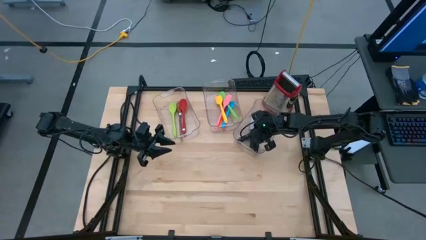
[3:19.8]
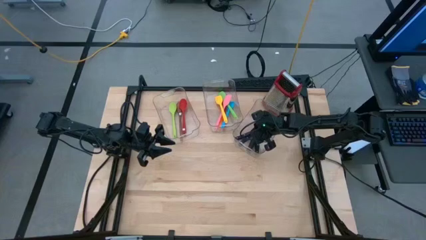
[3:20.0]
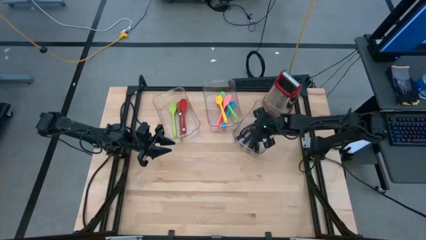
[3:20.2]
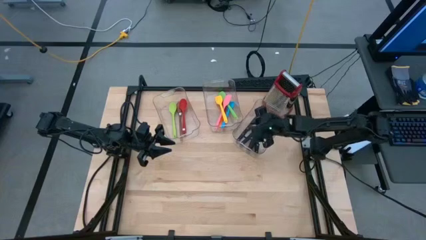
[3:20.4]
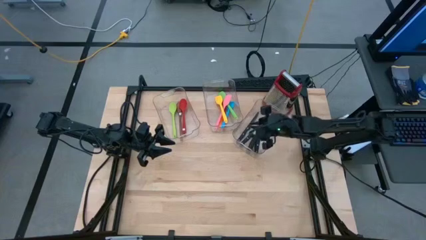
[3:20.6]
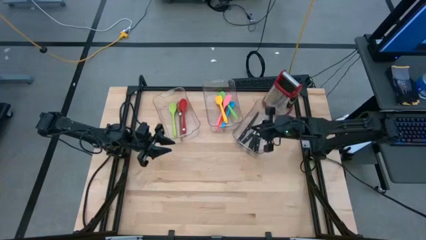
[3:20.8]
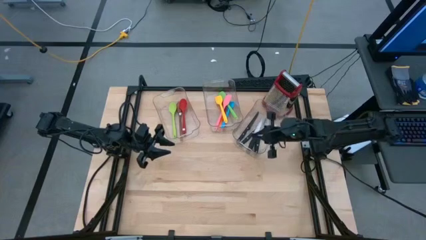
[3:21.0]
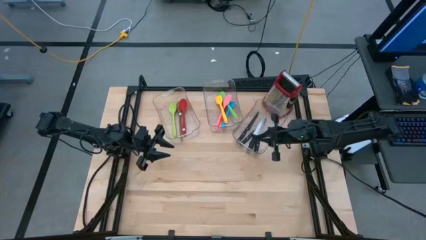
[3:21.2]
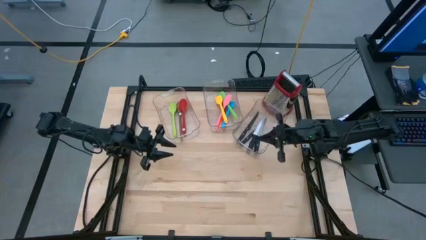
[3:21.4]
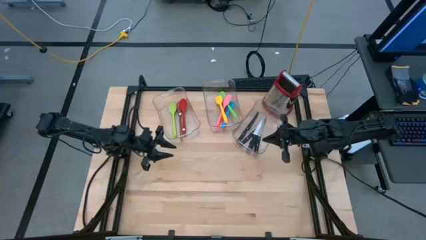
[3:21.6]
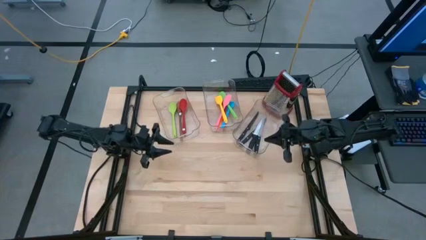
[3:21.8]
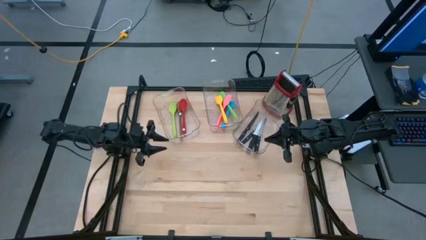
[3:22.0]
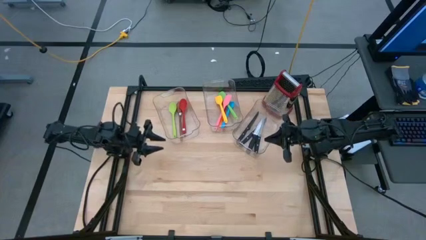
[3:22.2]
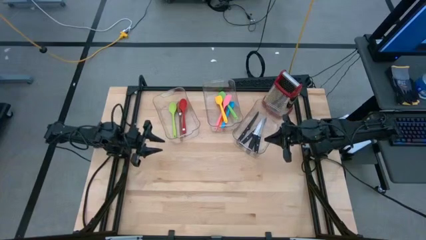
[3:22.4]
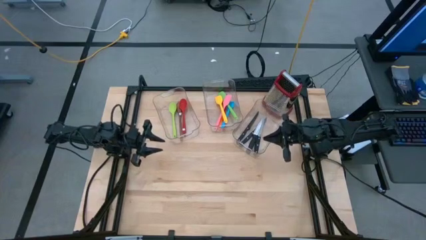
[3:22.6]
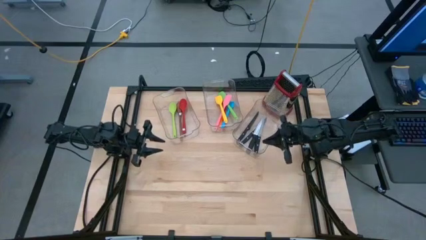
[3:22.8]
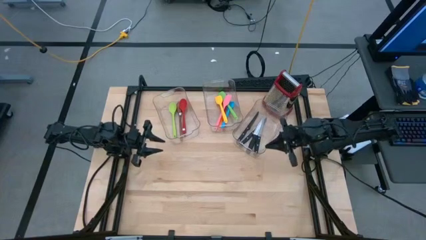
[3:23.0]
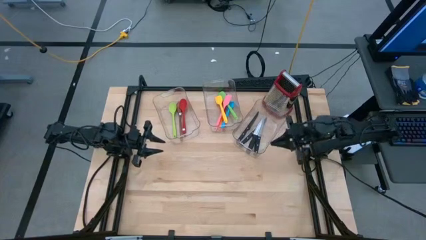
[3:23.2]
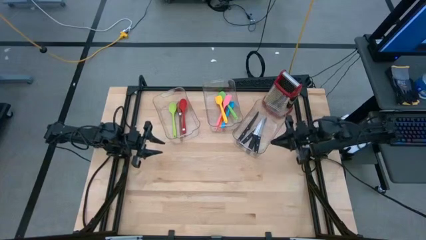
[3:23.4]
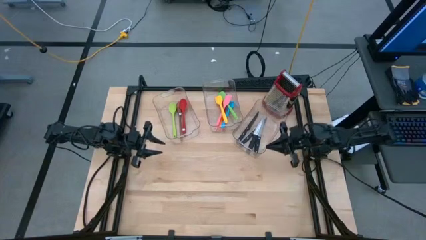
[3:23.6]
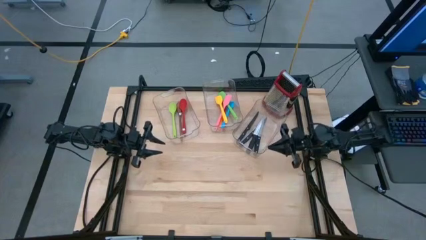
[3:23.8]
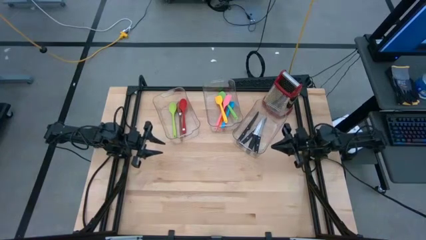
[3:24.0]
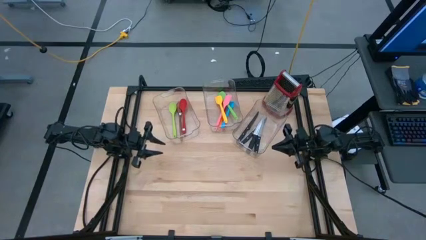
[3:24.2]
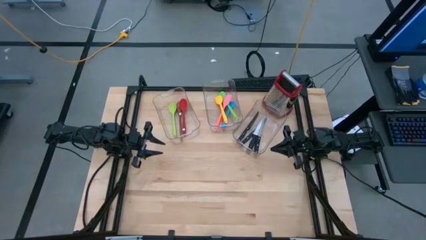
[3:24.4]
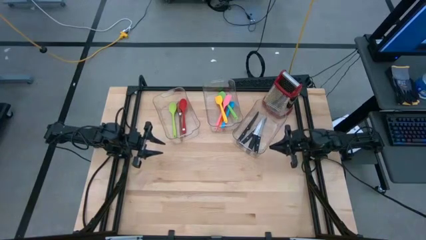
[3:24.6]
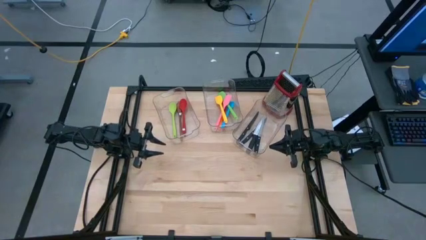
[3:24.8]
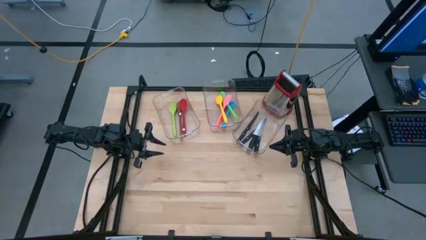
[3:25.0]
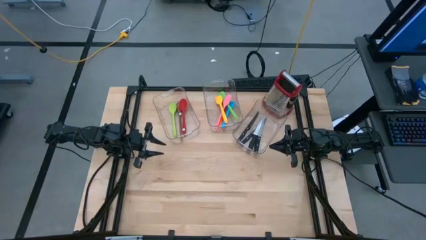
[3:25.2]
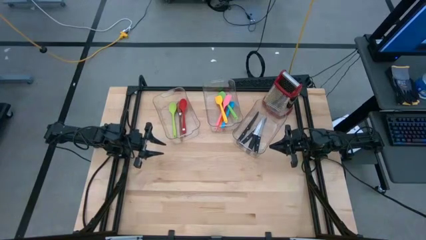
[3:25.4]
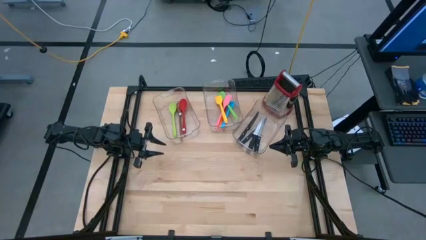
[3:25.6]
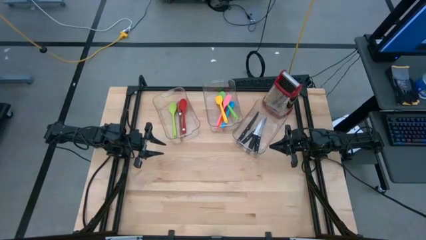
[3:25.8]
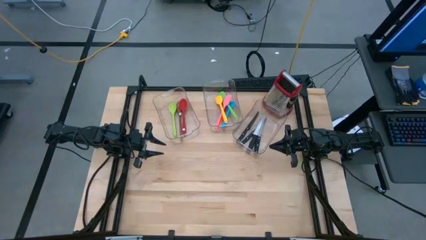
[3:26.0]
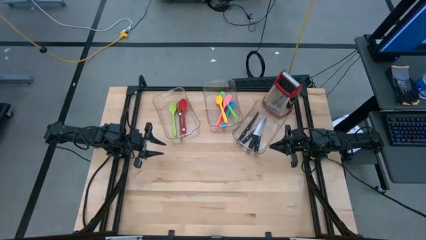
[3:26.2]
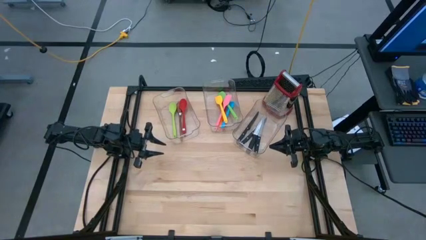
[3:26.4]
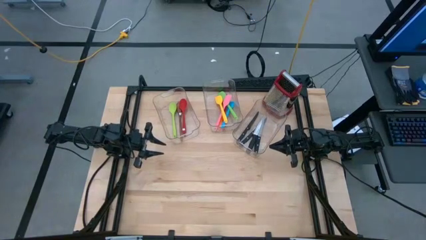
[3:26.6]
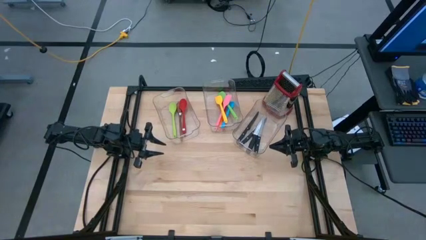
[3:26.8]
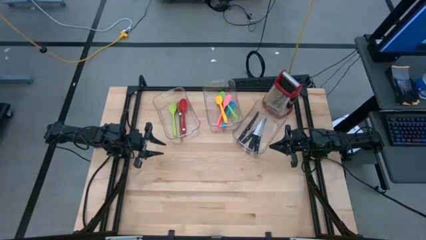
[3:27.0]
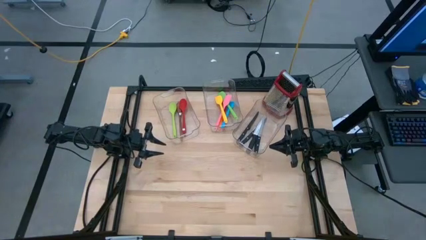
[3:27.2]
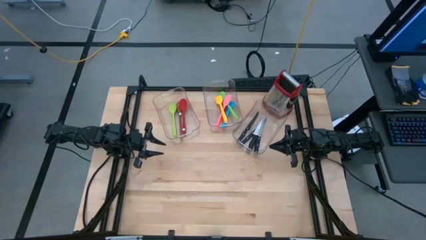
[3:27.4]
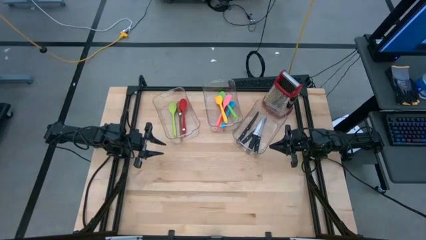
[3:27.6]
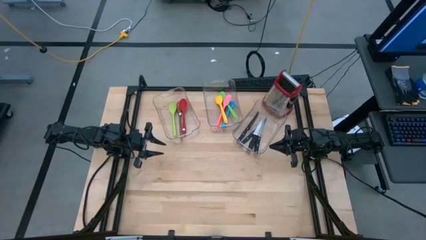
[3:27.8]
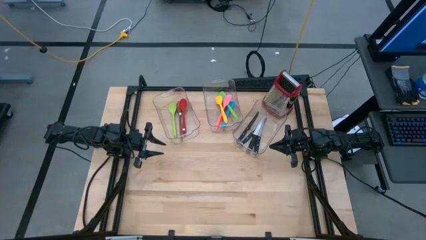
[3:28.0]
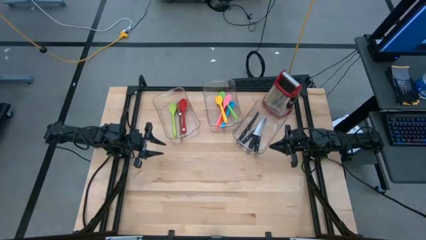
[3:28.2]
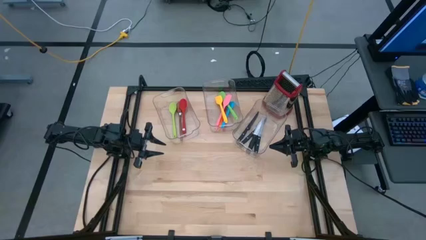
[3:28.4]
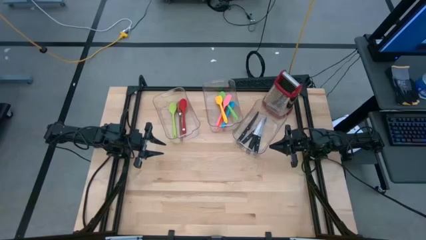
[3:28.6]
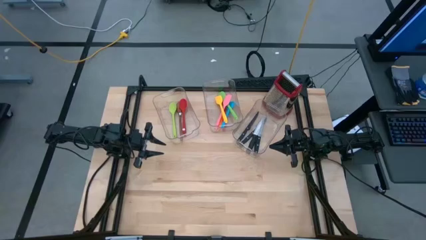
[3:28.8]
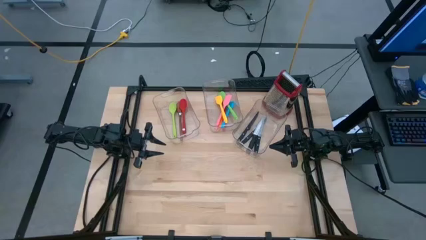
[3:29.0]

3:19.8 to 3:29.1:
Task: Pick & Place Kitchen Items
Return to Home Position

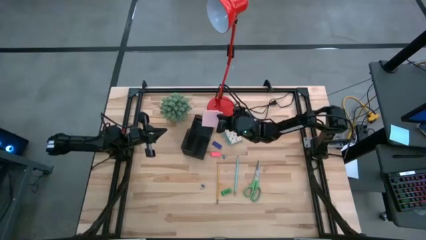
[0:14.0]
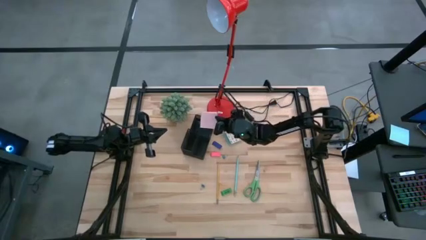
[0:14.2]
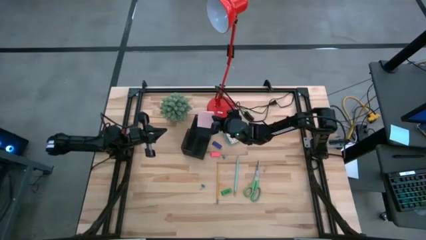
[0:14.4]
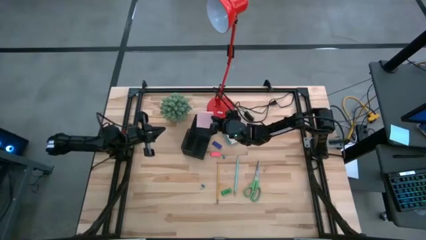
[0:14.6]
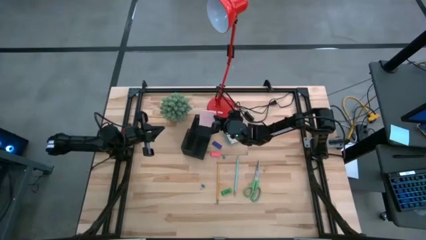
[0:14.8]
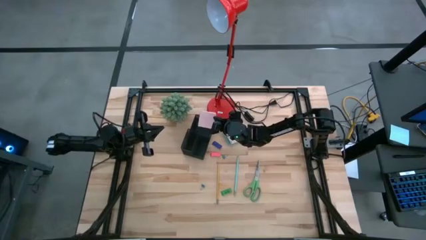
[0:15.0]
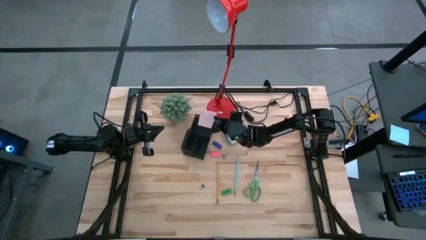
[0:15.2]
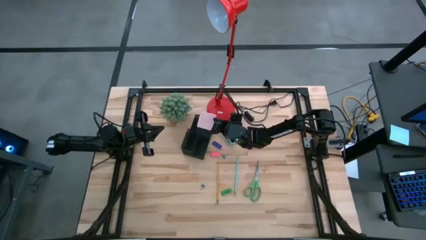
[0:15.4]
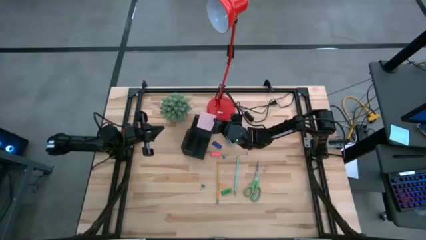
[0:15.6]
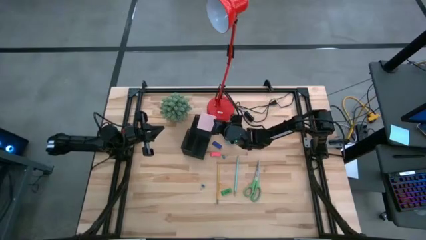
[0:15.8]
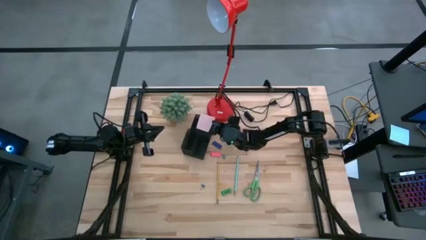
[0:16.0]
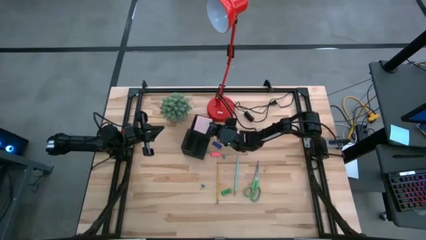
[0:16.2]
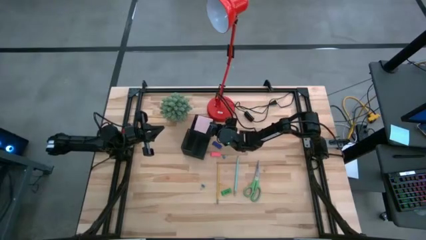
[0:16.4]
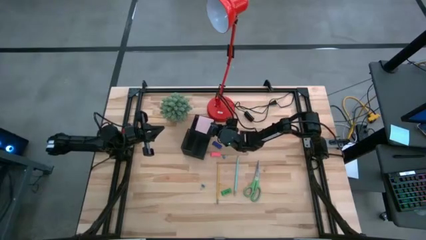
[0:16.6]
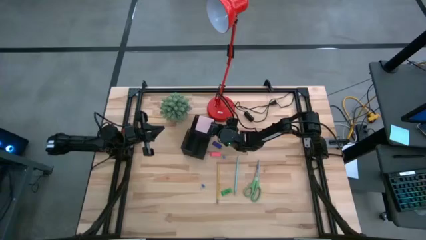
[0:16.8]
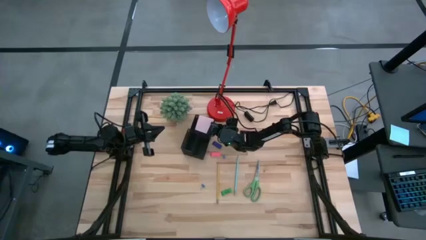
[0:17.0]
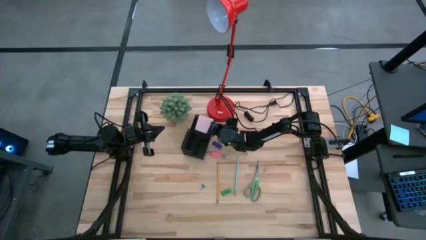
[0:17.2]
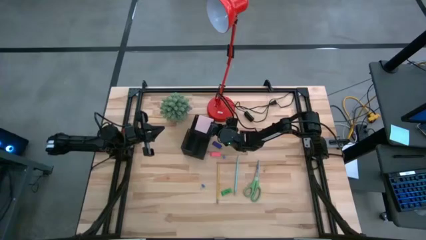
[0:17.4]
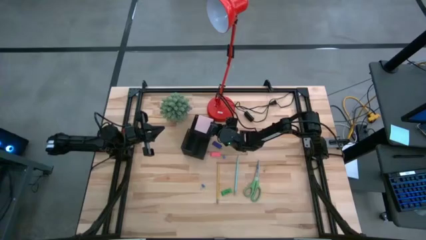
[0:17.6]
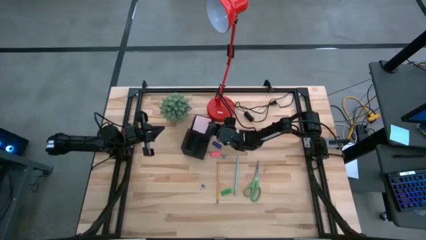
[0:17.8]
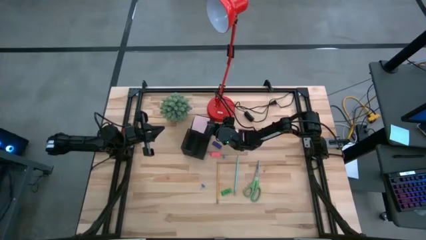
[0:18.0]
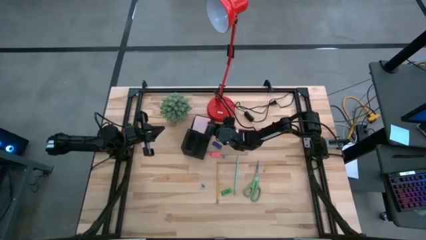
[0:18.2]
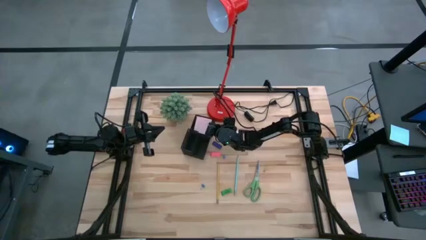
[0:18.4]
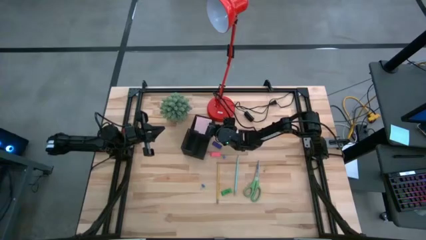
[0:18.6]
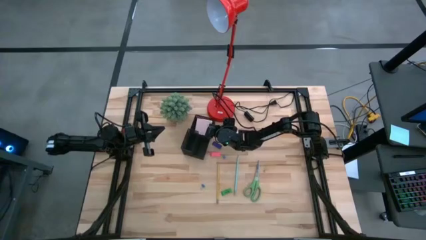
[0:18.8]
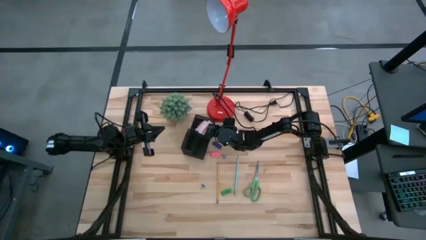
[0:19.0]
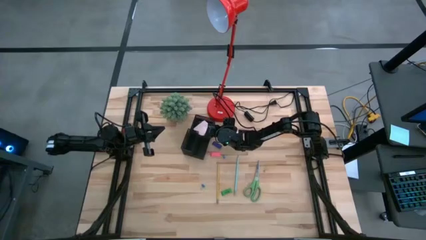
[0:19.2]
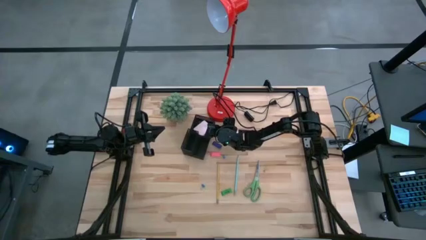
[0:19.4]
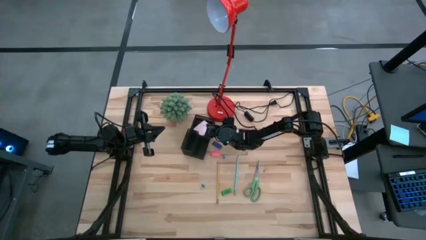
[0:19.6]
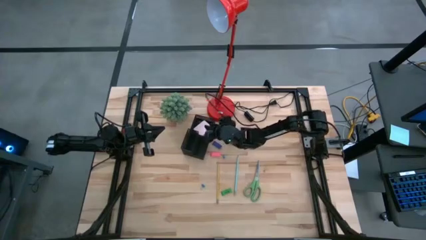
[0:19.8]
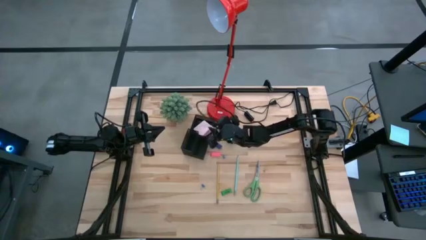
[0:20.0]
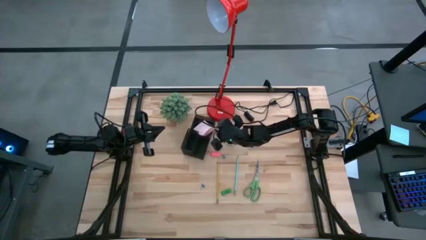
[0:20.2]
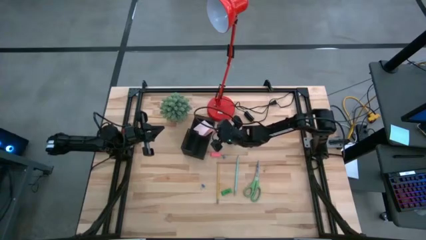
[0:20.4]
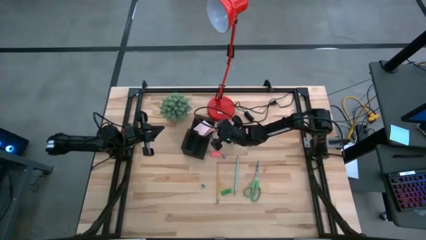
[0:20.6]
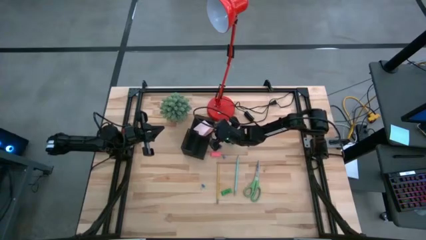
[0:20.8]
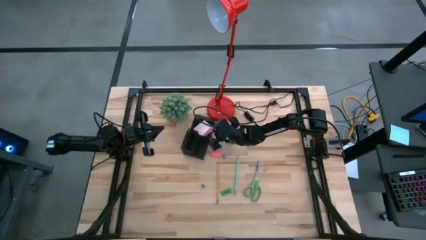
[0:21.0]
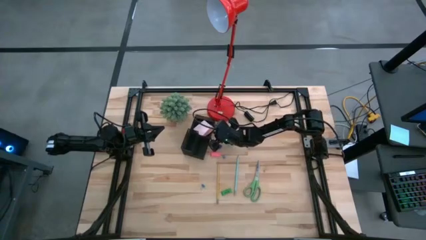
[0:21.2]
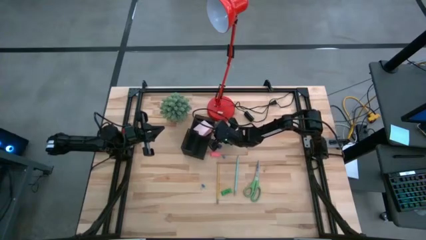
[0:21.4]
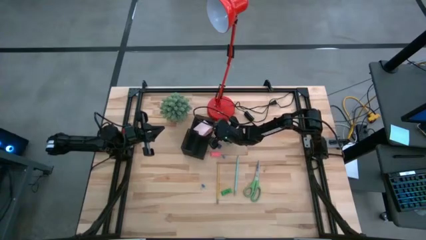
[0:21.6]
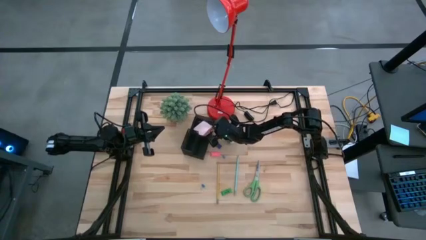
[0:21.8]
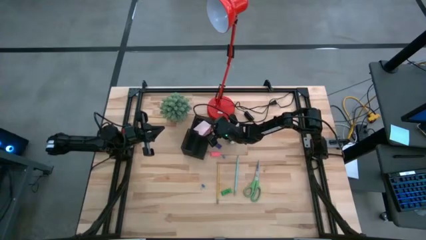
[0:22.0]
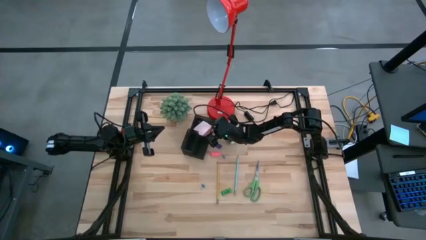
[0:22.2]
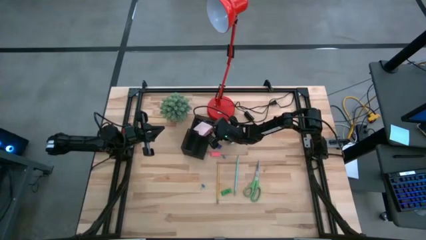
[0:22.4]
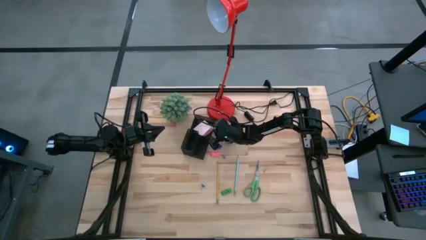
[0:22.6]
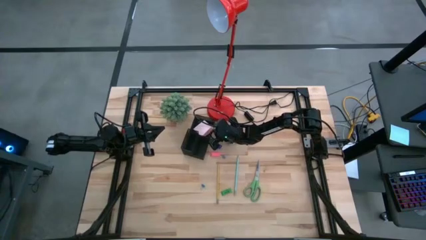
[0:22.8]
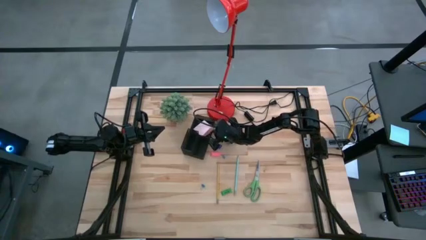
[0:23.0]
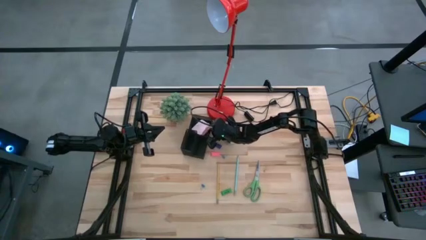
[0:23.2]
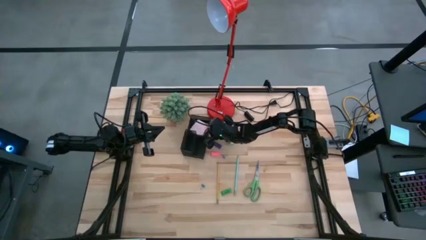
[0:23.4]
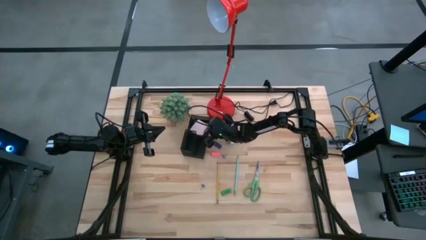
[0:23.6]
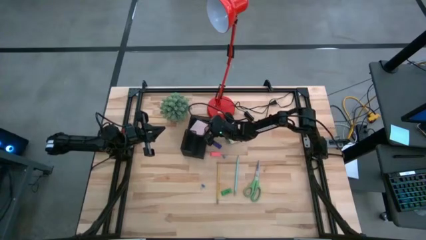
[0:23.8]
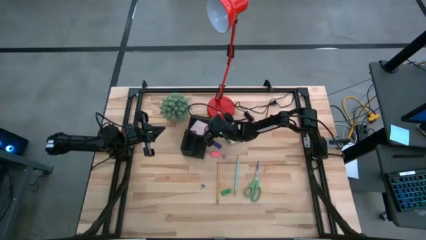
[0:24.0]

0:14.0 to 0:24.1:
Task: Pick and place office supplies into organizer
Put the pink sticky notes in the black desk organizer
